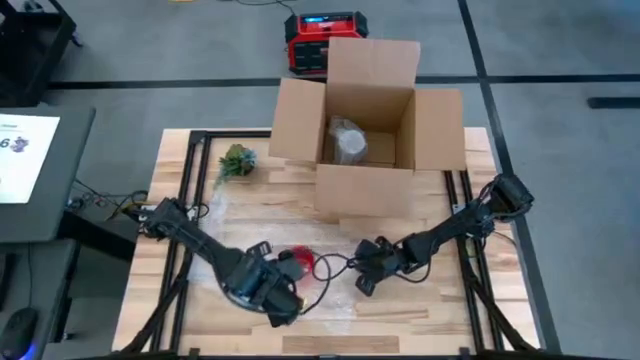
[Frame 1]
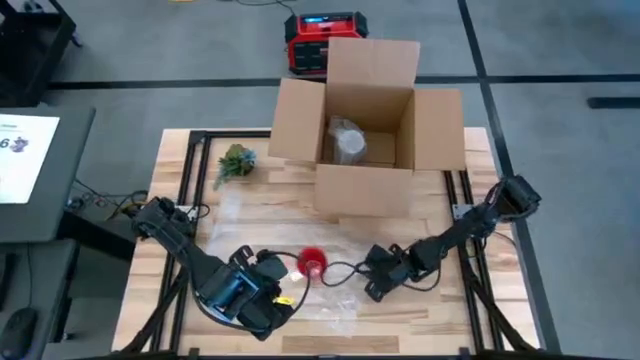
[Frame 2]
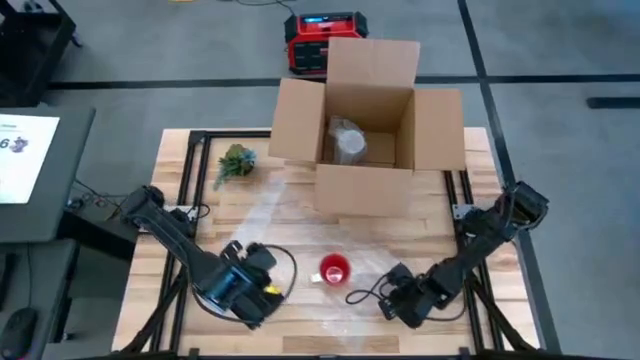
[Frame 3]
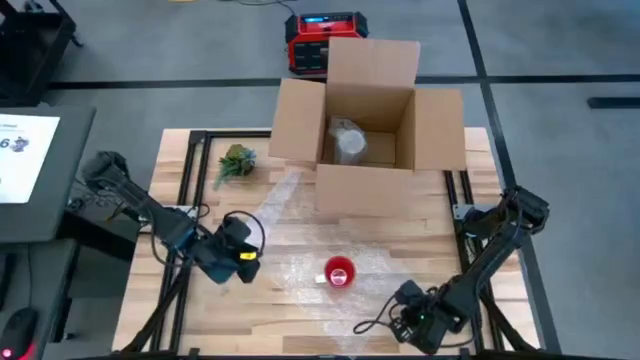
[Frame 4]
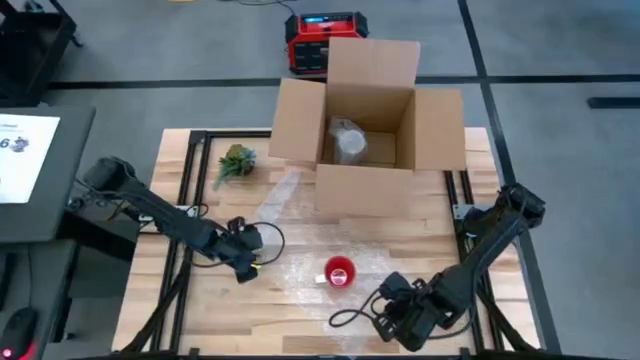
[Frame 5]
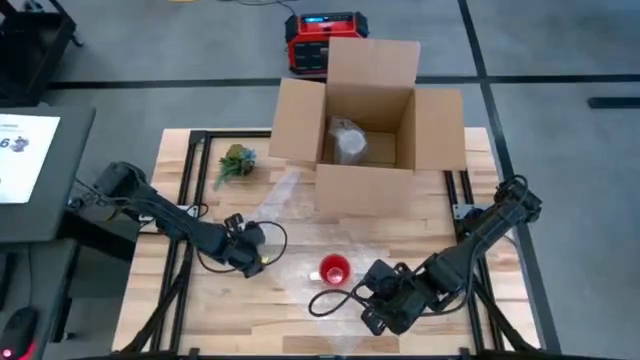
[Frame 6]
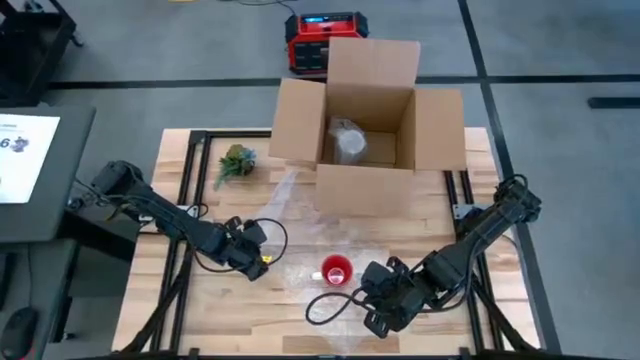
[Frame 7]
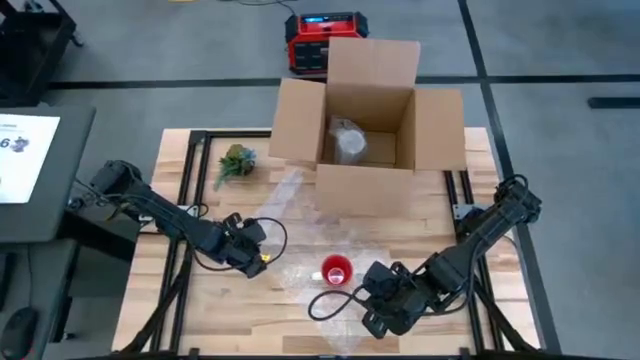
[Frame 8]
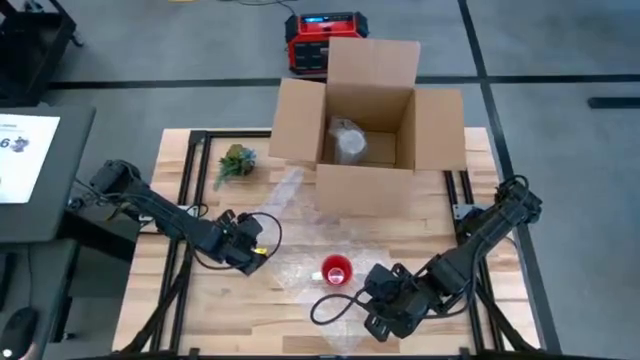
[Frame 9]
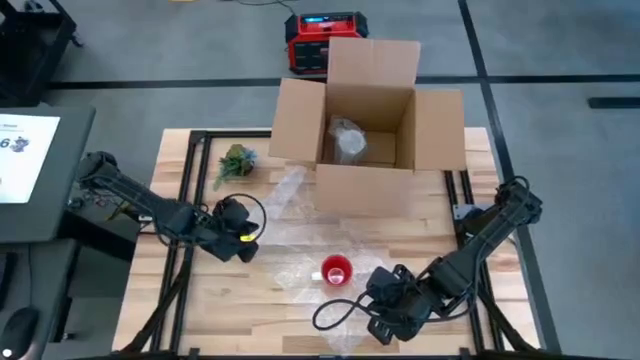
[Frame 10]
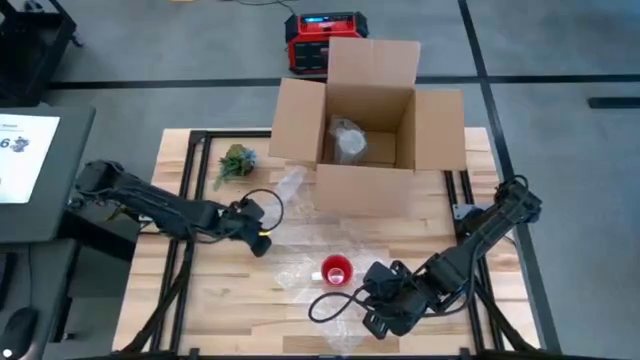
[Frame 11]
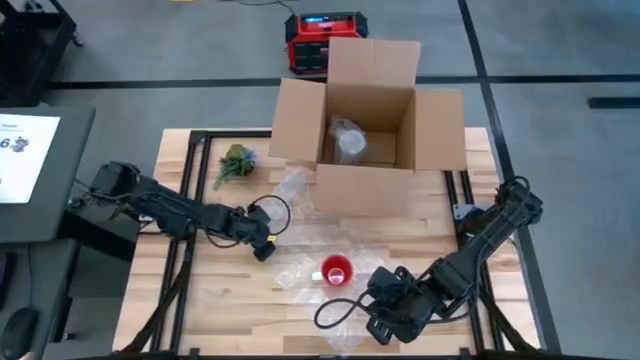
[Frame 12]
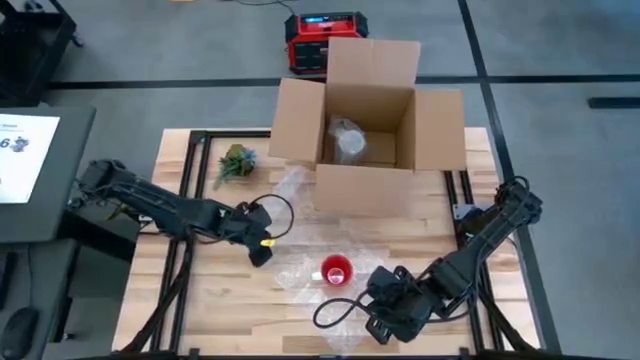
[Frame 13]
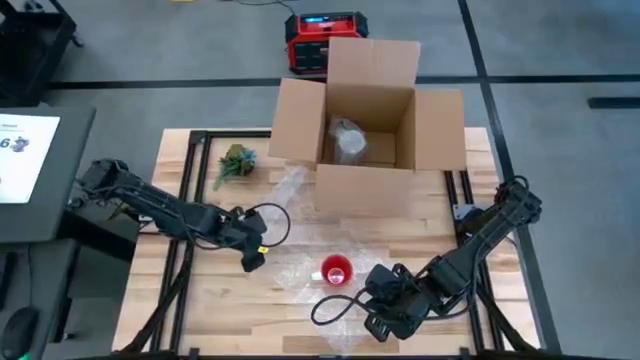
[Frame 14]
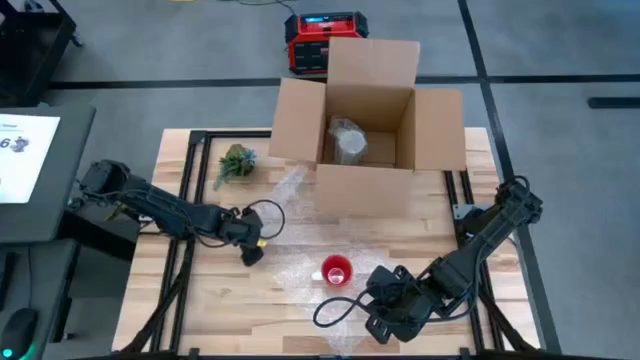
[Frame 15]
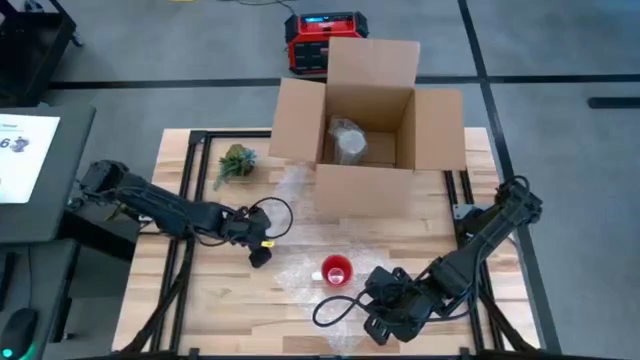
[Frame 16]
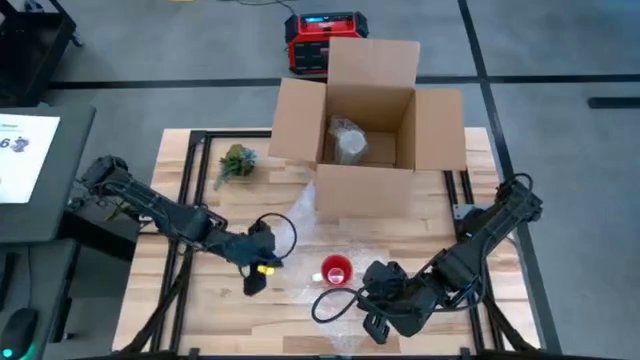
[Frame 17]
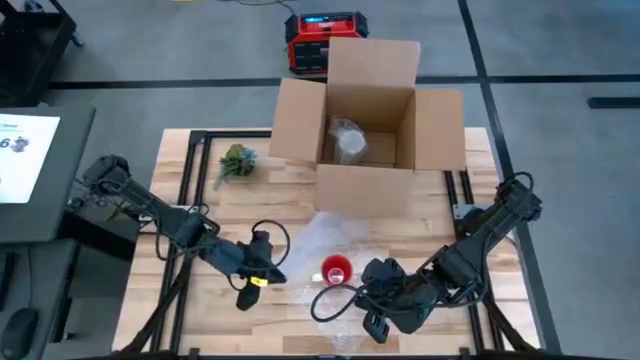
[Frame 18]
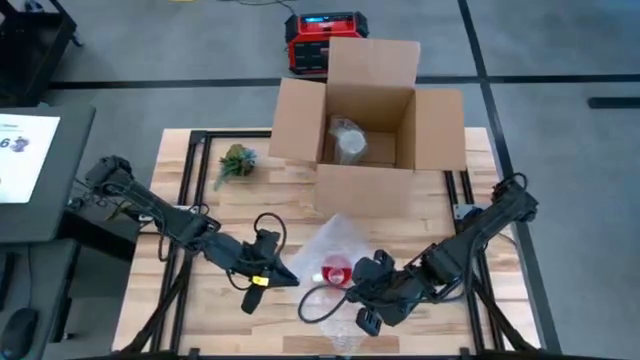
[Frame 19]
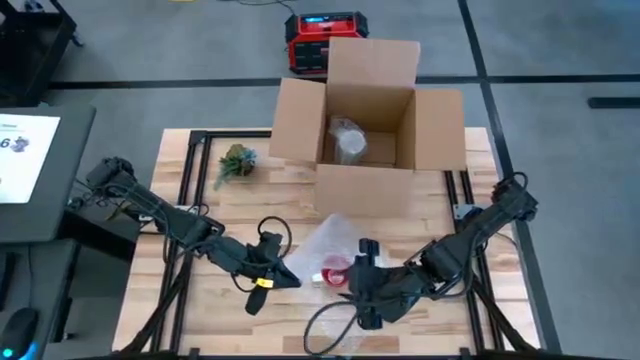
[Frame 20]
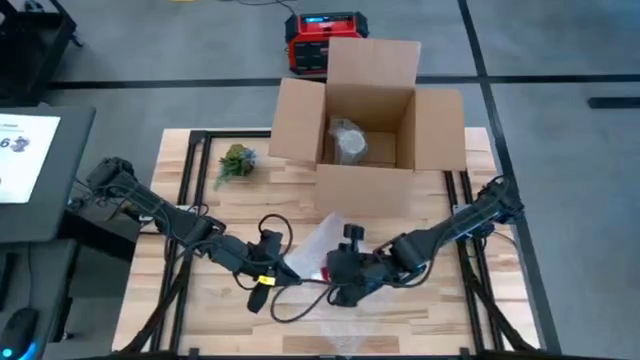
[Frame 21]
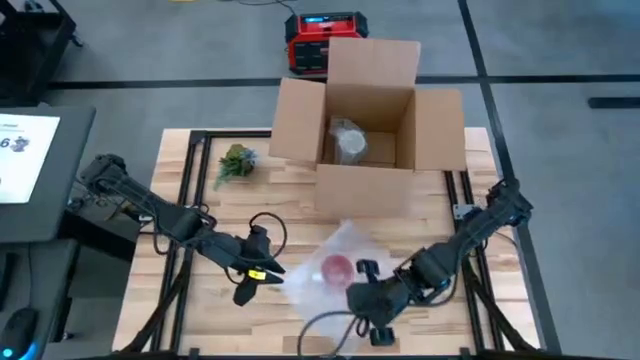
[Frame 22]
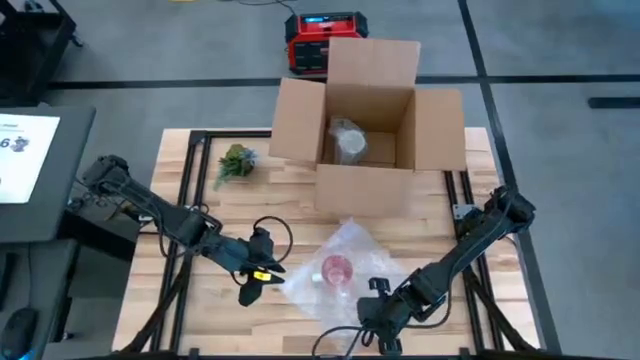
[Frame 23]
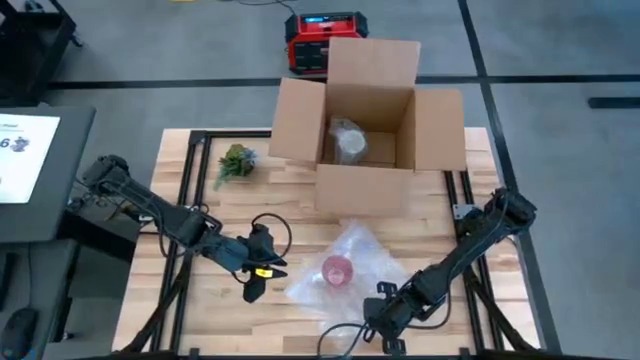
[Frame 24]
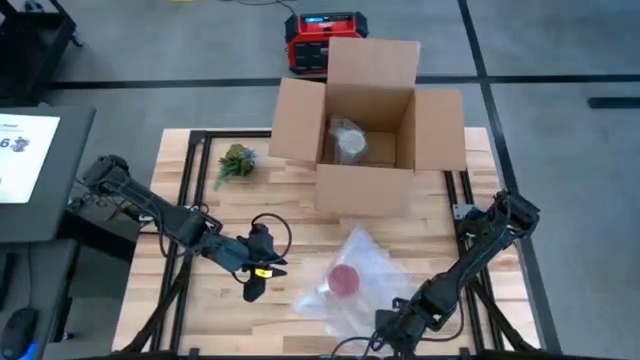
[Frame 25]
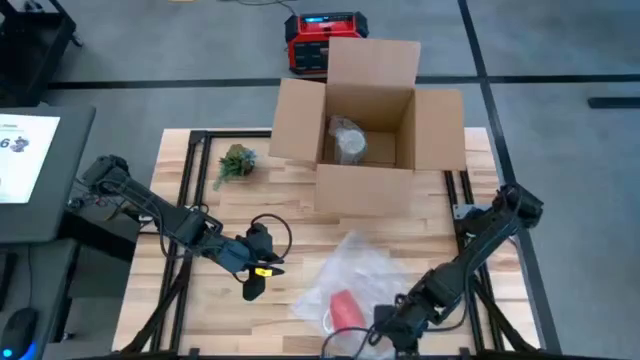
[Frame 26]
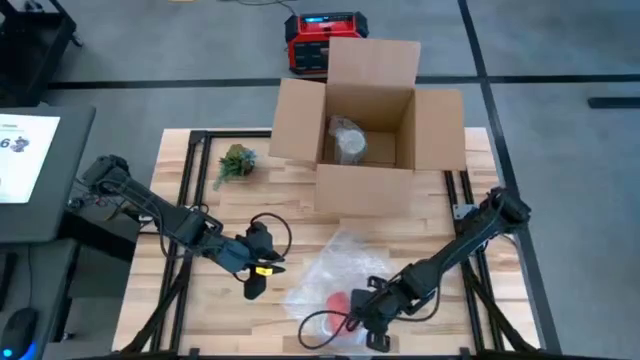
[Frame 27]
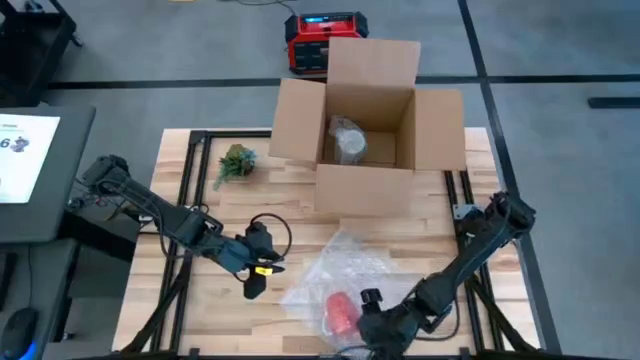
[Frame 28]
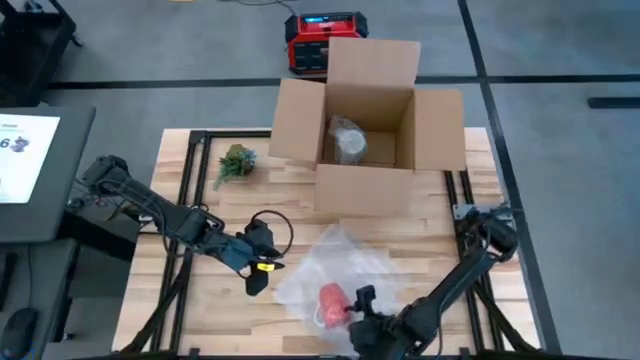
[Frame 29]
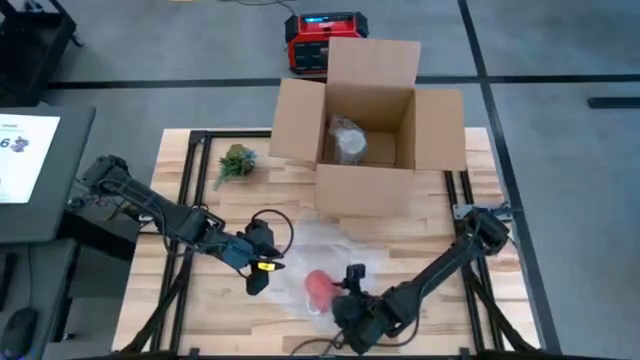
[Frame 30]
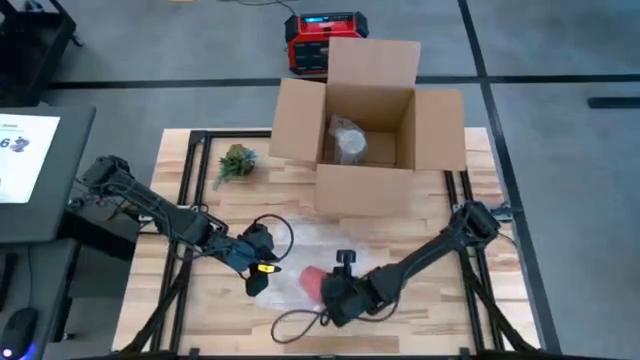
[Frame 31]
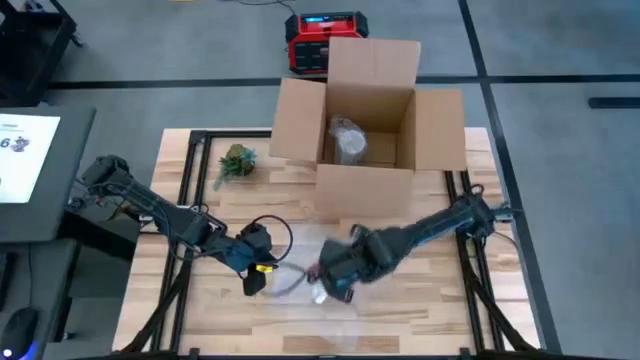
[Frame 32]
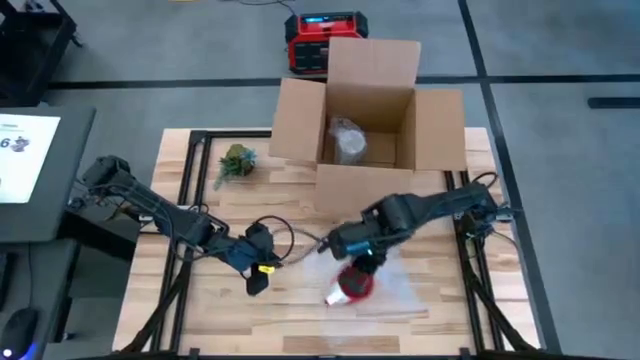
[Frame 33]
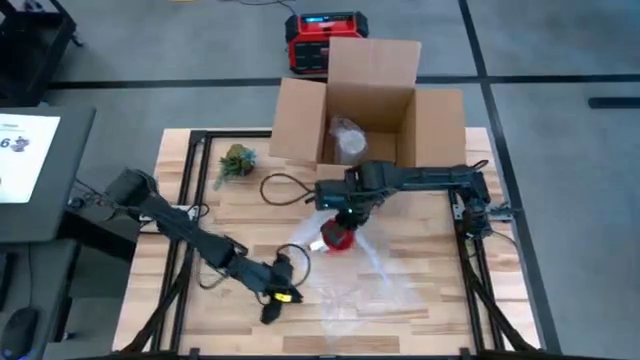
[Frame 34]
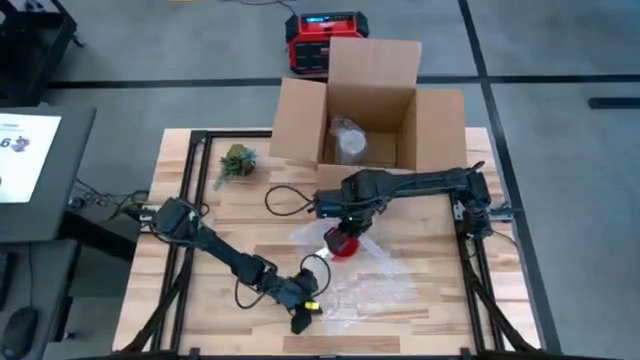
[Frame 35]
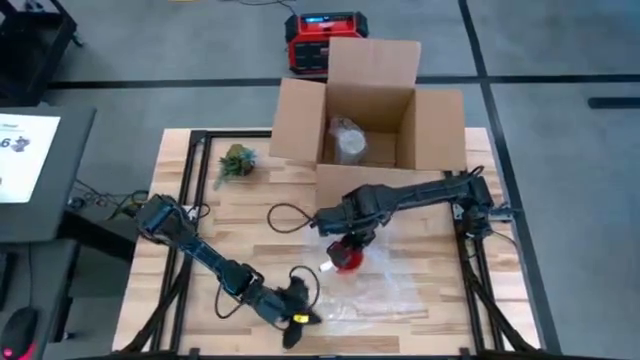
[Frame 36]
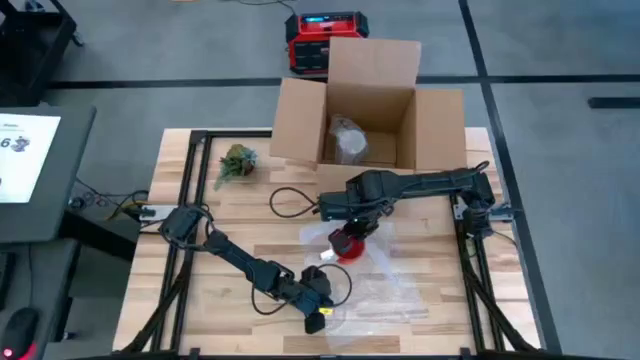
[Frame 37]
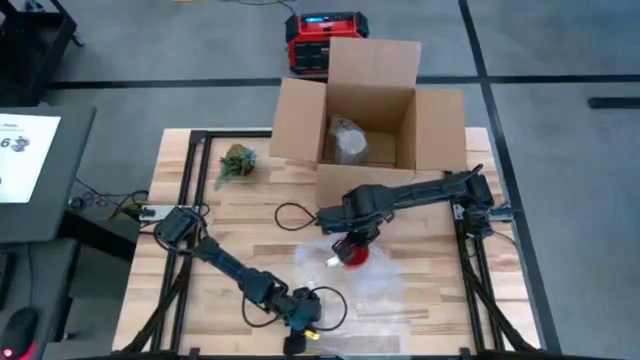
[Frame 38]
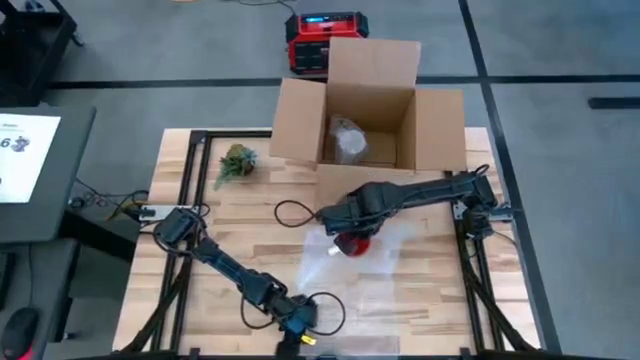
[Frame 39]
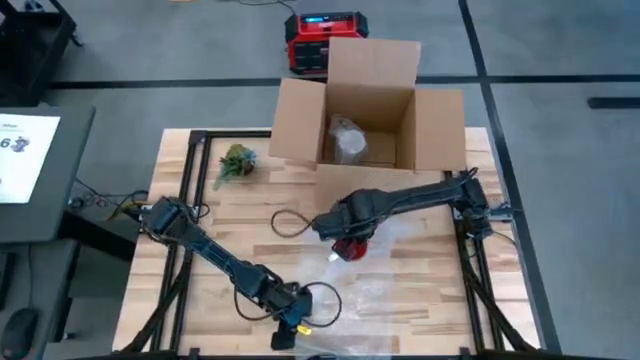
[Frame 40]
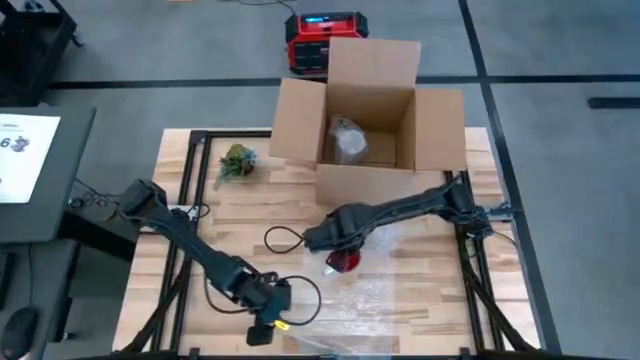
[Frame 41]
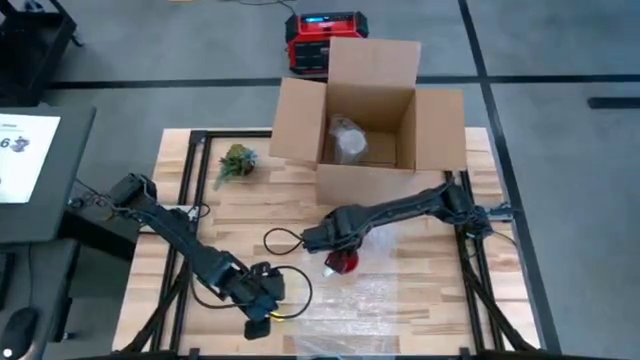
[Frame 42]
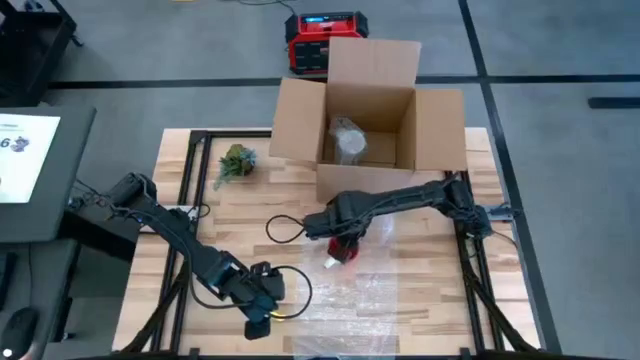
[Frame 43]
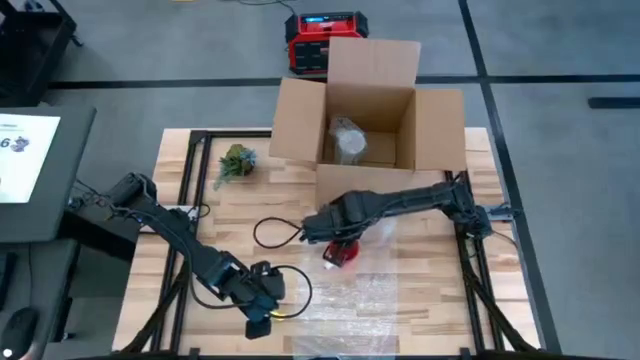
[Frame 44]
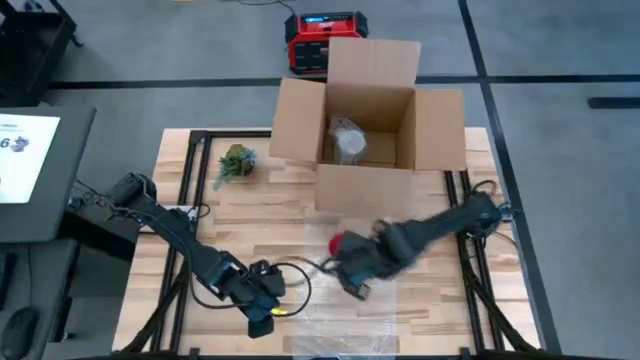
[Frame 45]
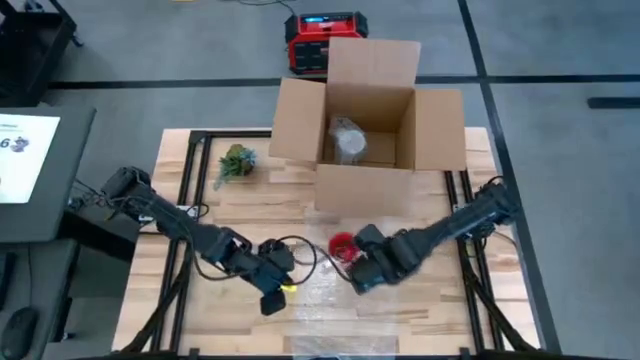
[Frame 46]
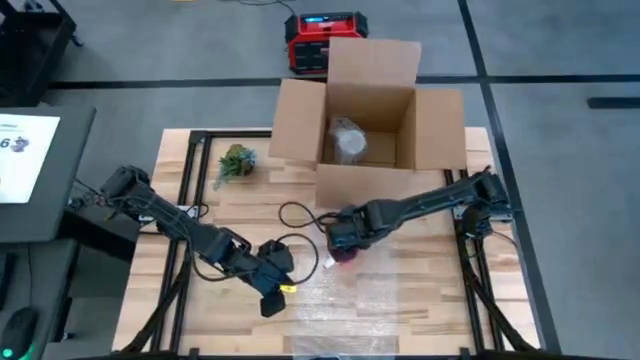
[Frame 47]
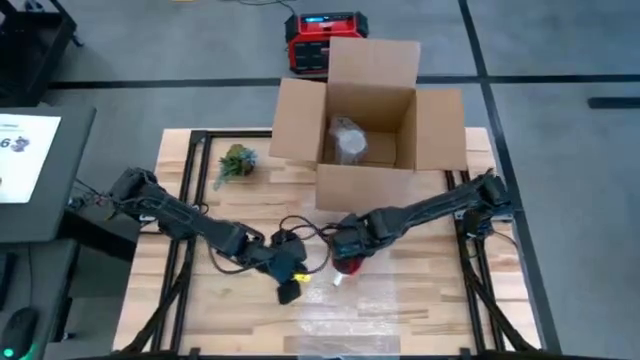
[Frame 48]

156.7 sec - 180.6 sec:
Task: wrap mug
Wrap the red mug in the bubble wrap
